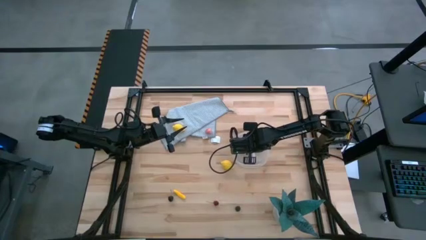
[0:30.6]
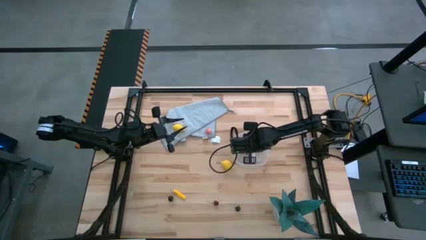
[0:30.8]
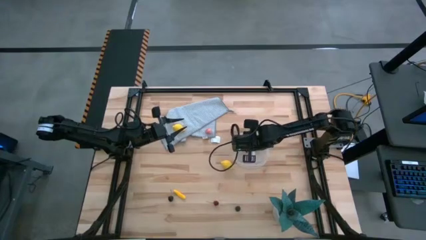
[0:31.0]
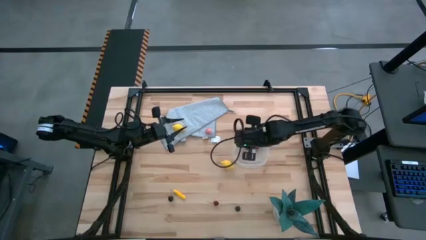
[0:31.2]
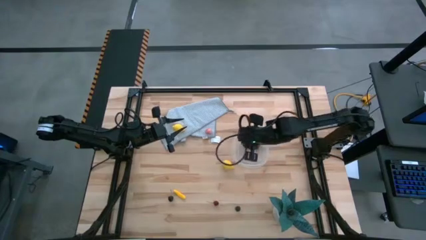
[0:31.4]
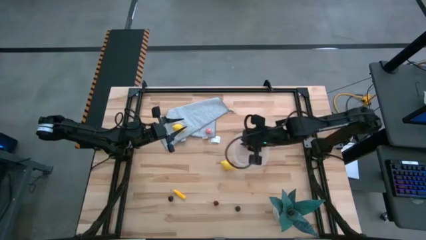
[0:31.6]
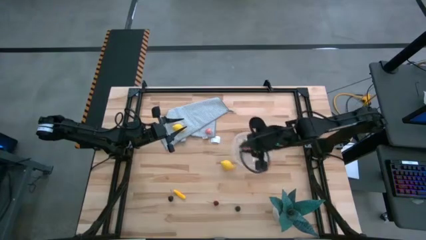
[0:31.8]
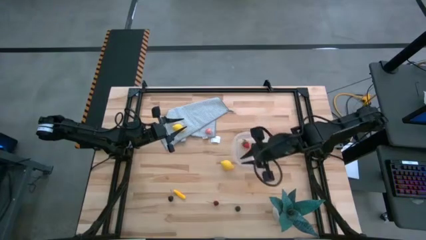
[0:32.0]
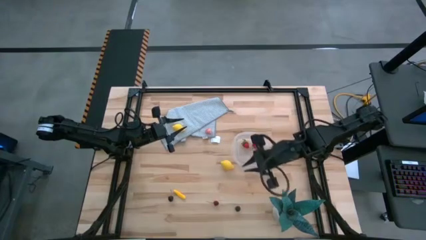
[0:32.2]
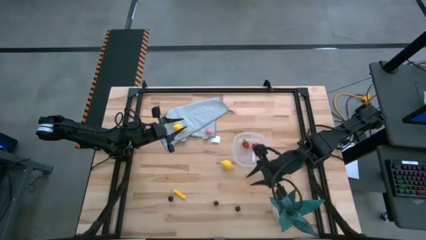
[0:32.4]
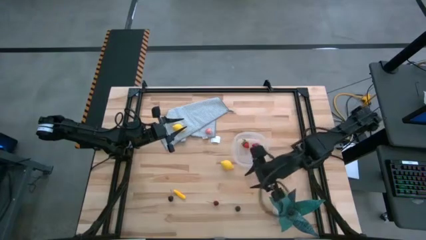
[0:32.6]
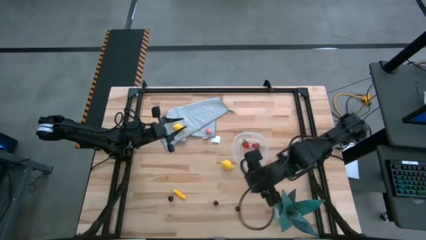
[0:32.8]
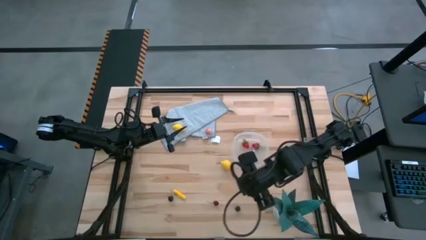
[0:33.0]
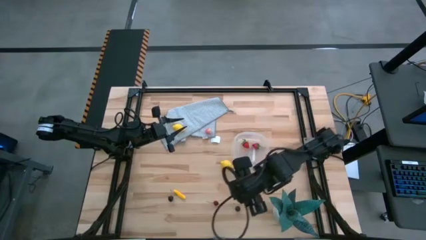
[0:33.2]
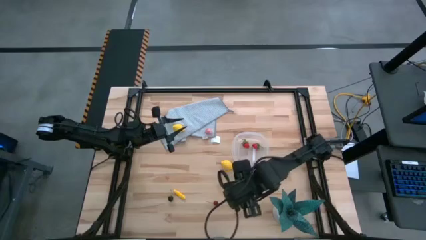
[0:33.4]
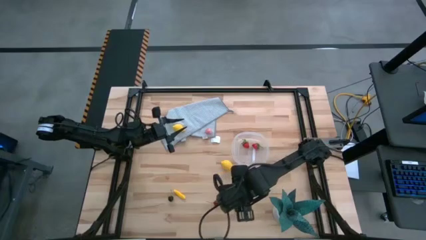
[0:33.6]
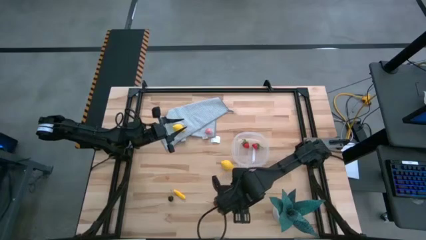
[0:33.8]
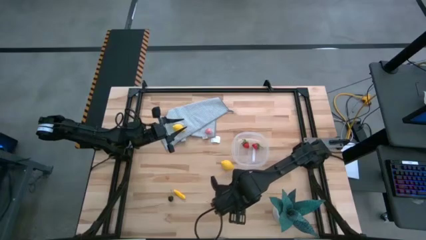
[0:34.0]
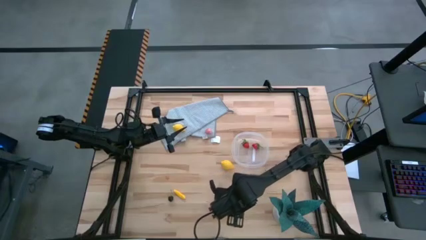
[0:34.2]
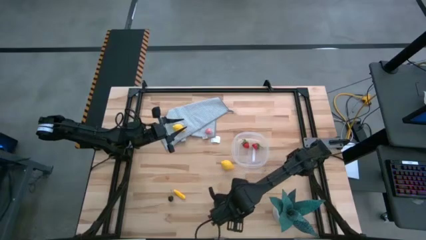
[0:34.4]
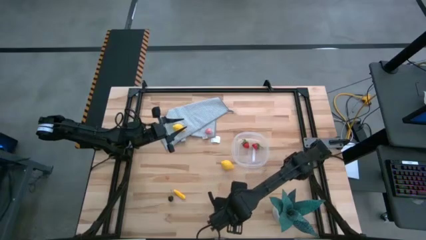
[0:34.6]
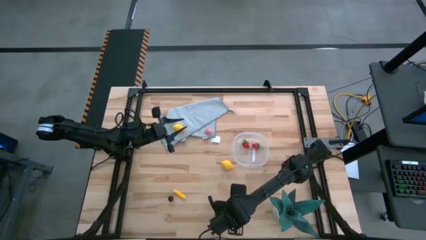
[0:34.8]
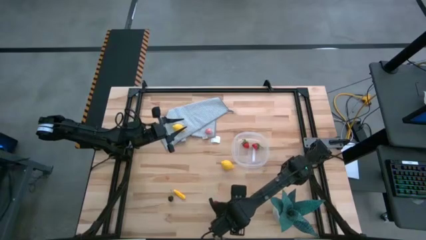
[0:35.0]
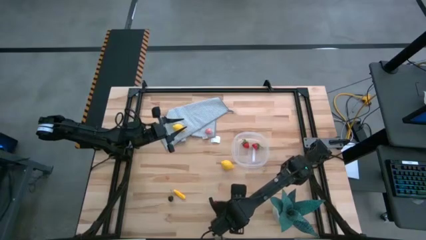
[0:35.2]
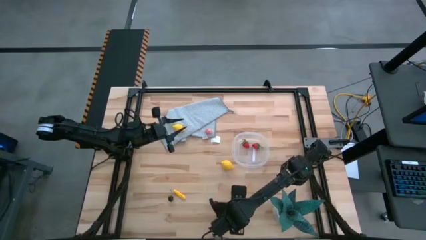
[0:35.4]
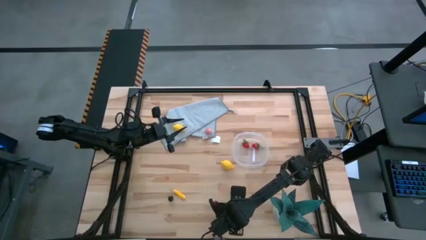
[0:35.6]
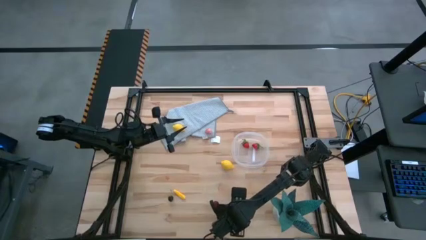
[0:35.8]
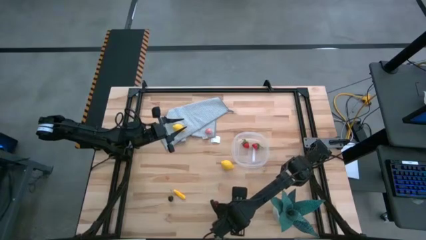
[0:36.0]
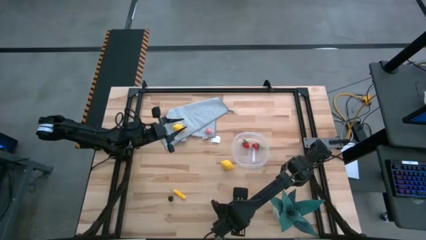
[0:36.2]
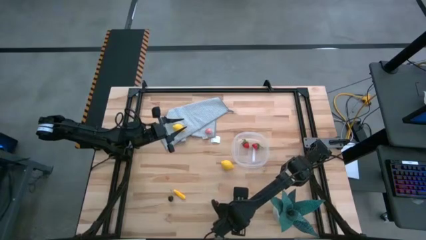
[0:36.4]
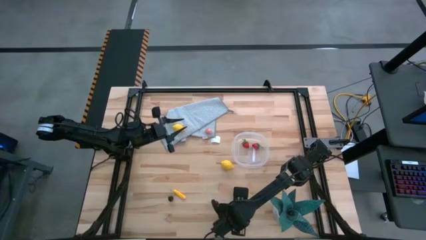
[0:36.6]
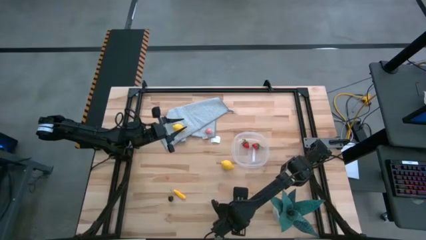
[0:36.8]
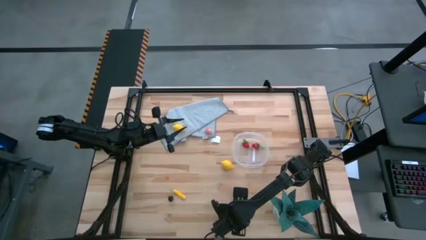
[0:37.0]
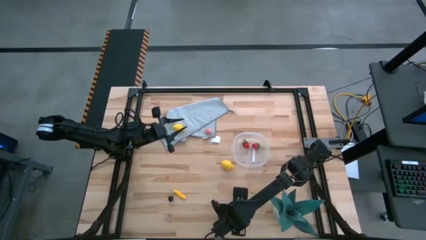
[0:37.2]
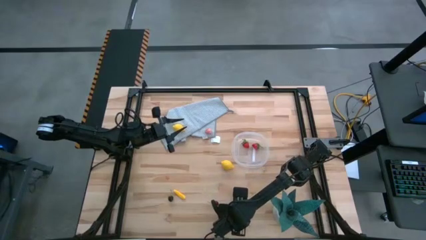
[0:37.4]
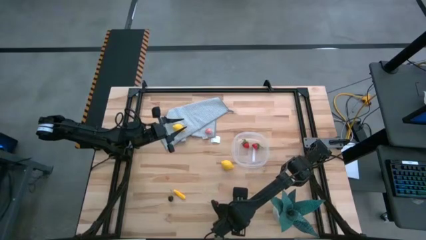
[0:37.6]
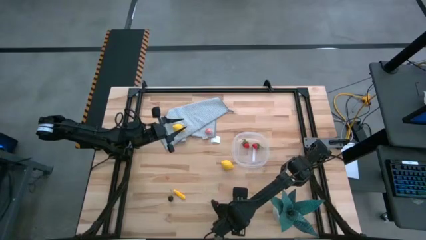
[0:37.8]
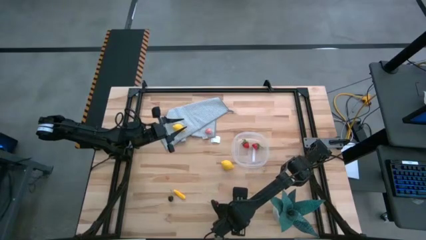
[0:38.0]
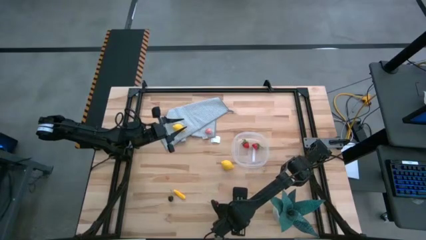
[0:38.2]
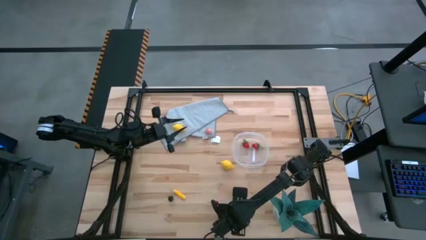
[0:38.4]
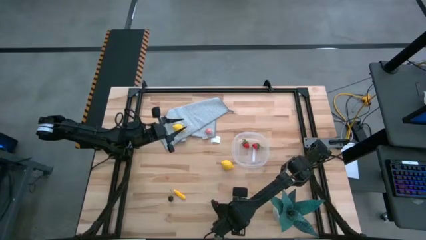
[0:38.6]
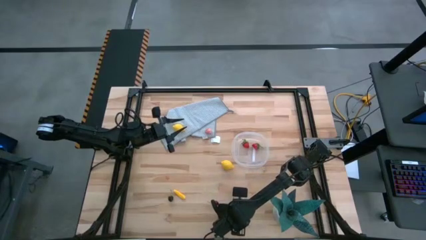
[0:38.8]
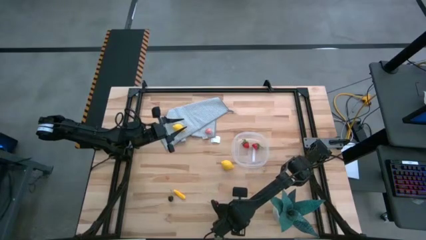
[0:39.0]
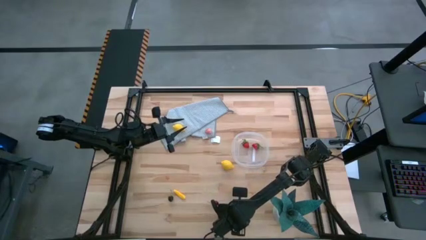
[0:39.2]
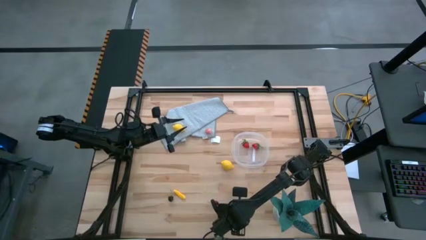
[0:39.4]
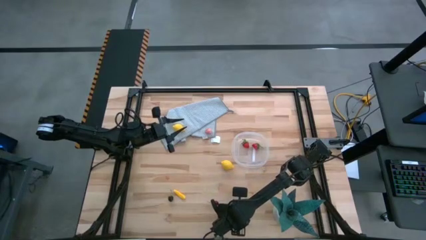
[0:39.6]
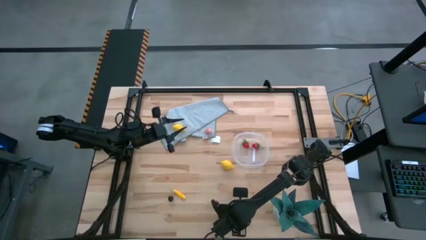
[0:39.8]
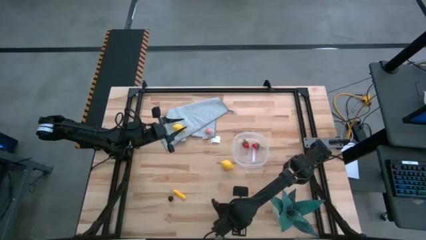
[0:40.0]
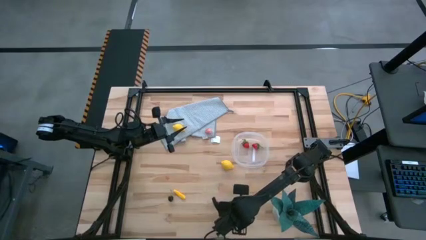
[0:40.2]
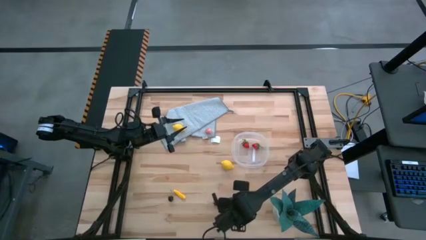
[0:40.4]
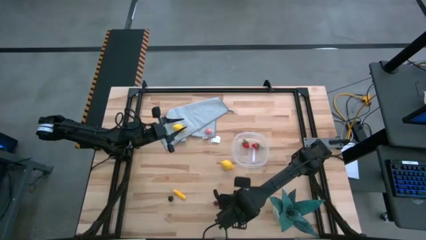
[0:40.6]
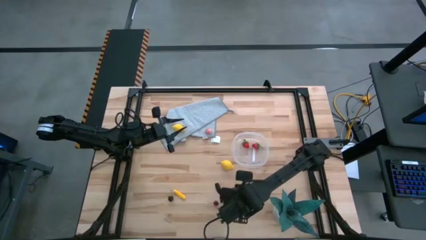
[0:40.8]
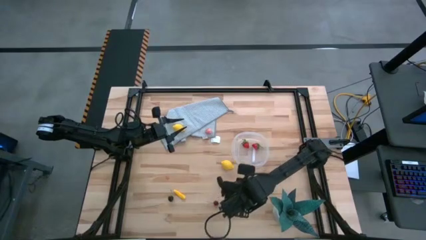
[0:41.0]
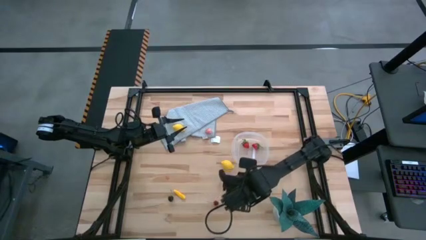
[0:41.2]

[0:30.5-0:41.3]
Task: Pick and placing Produce into tupperware
Put the blackberry into the transparent container
